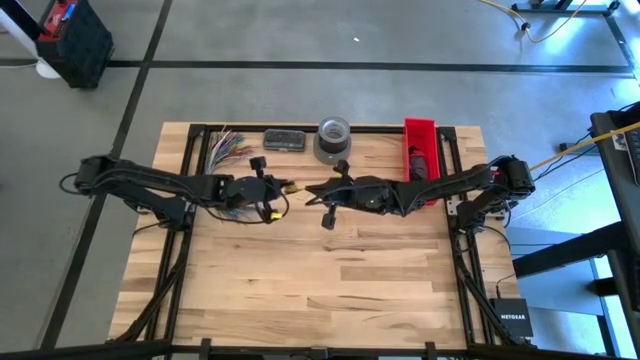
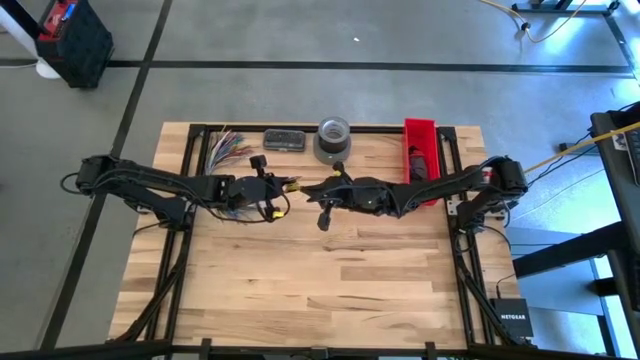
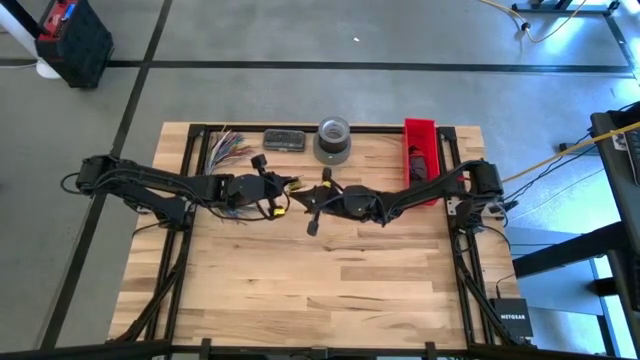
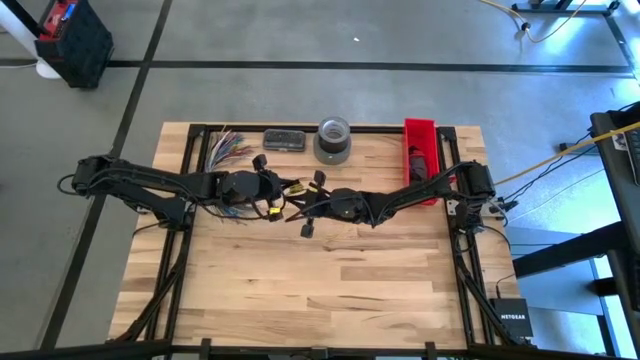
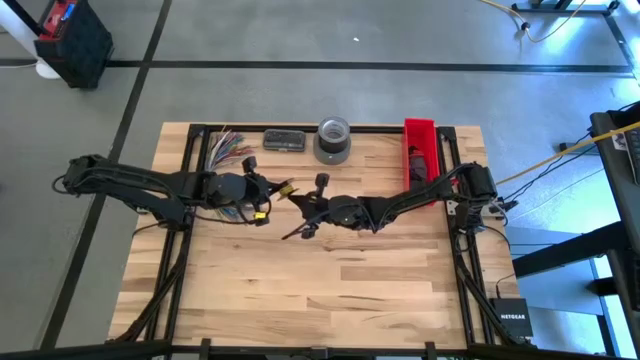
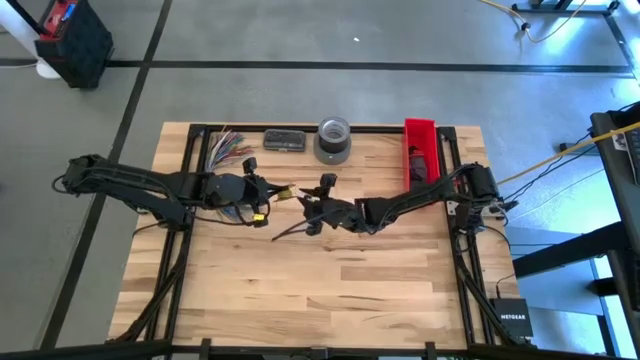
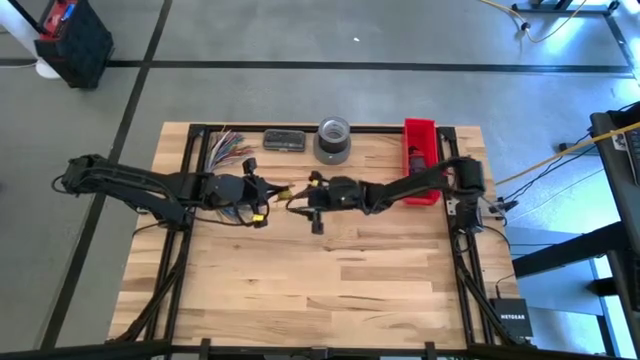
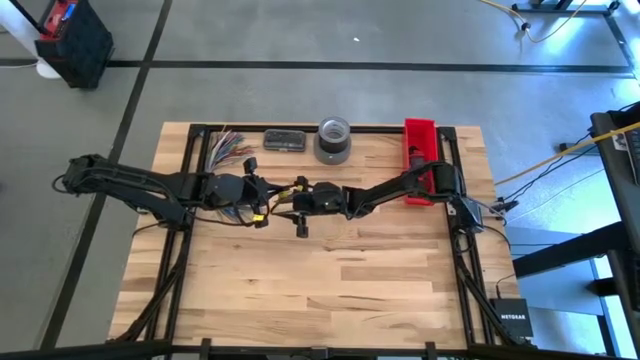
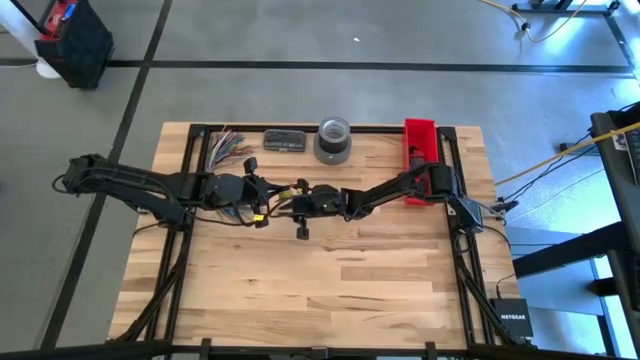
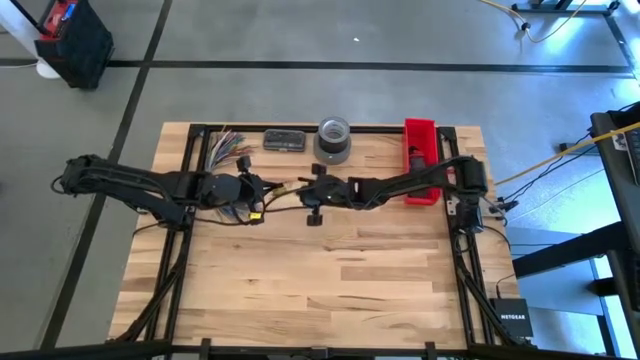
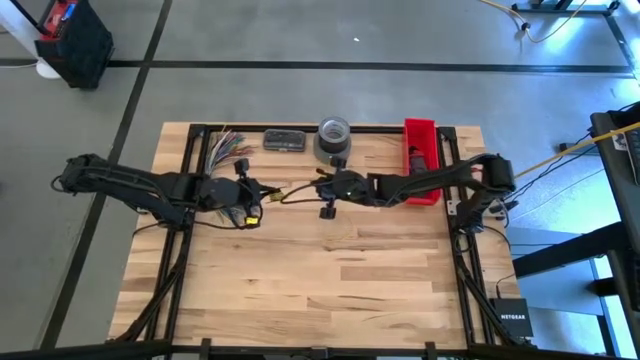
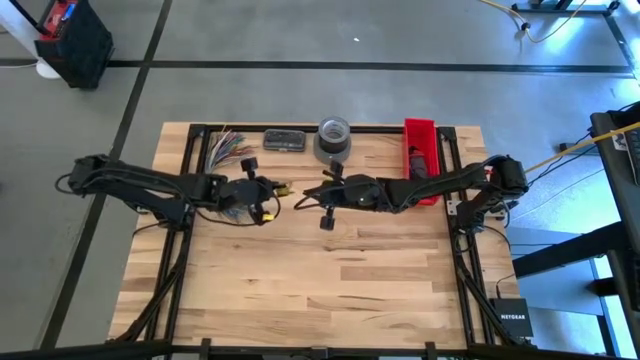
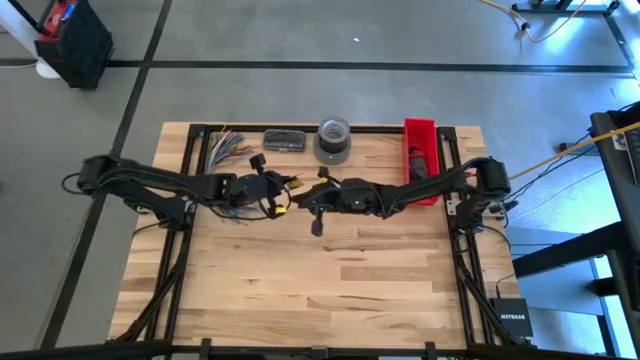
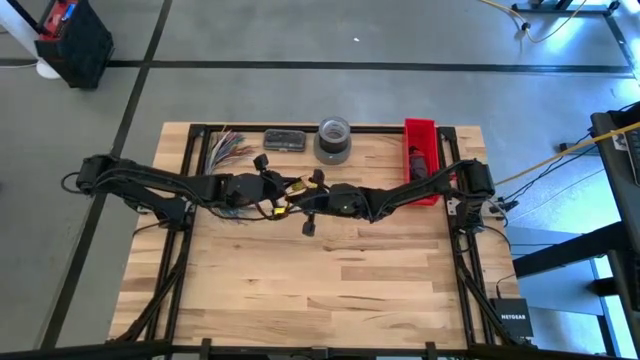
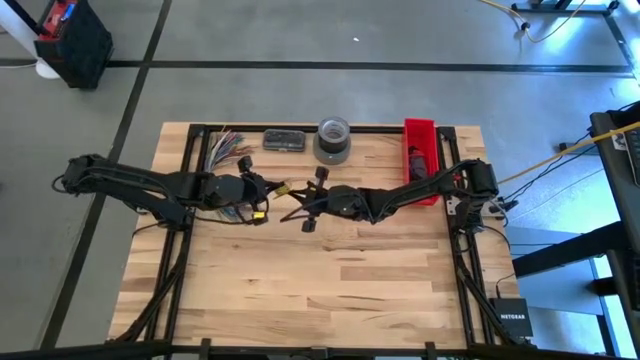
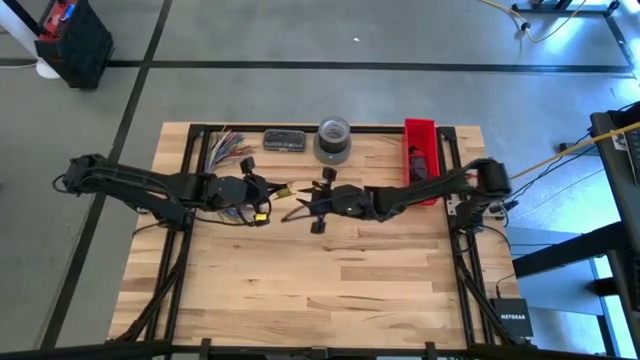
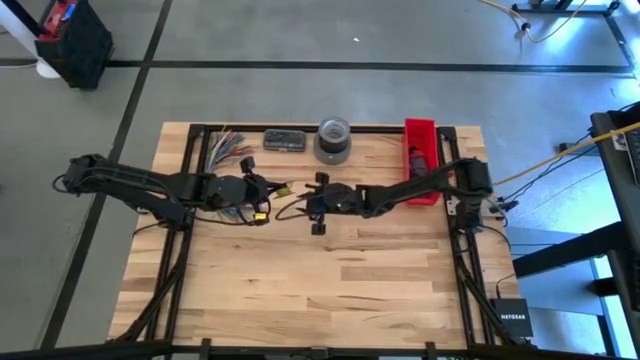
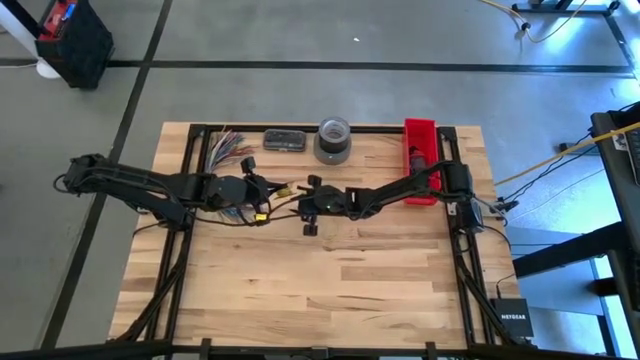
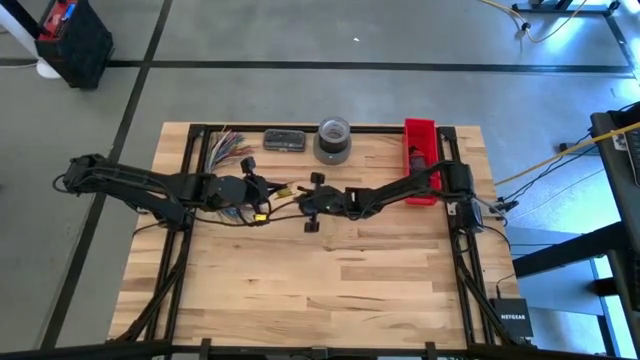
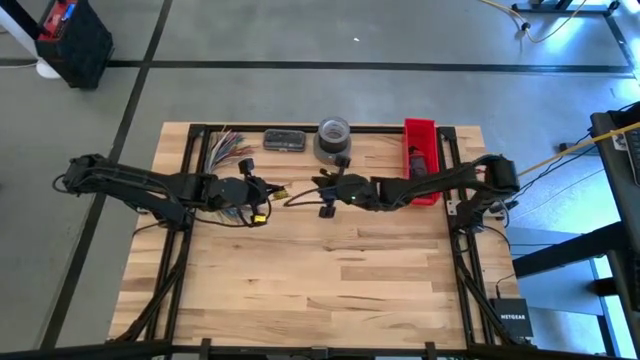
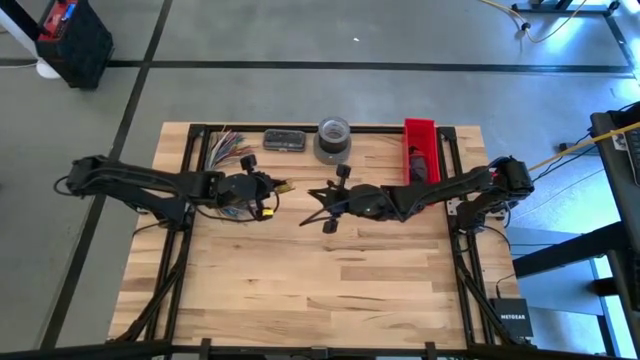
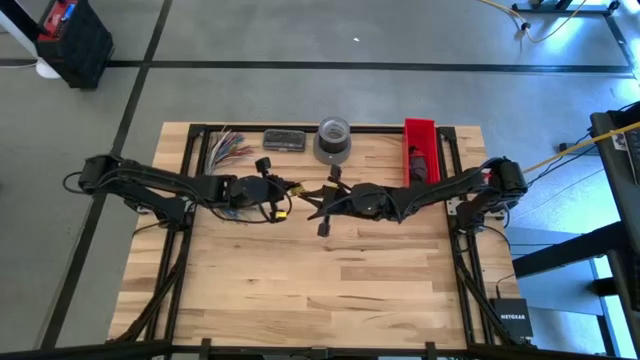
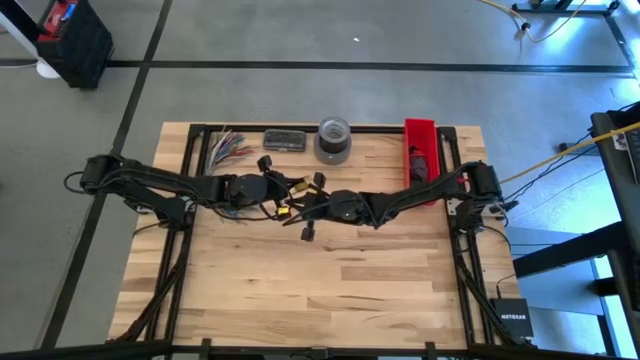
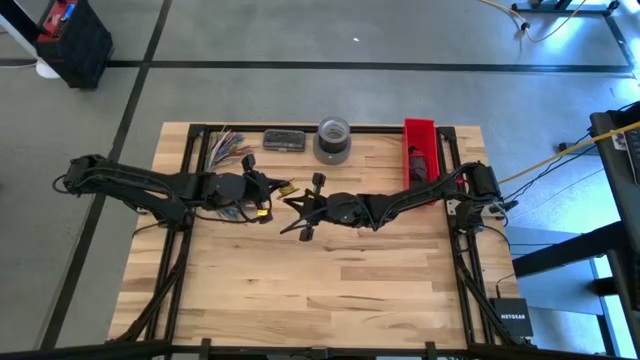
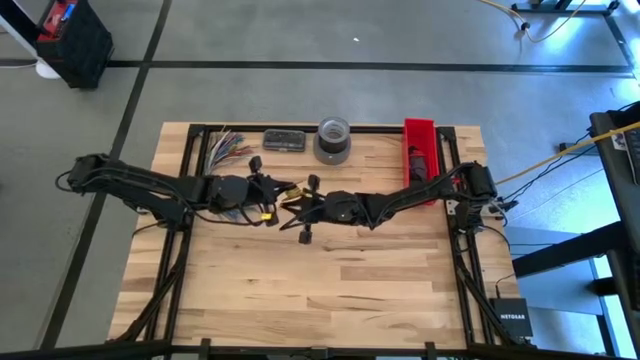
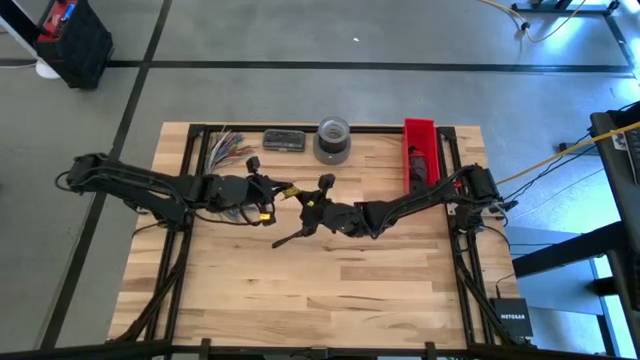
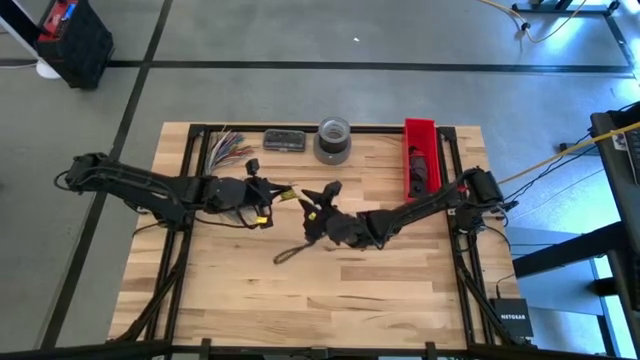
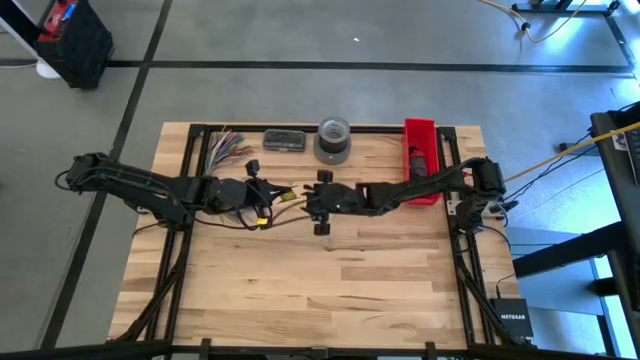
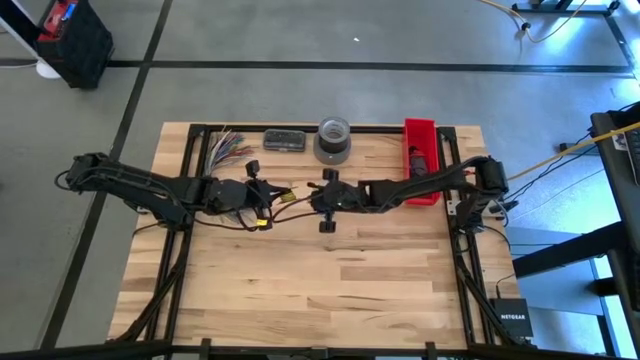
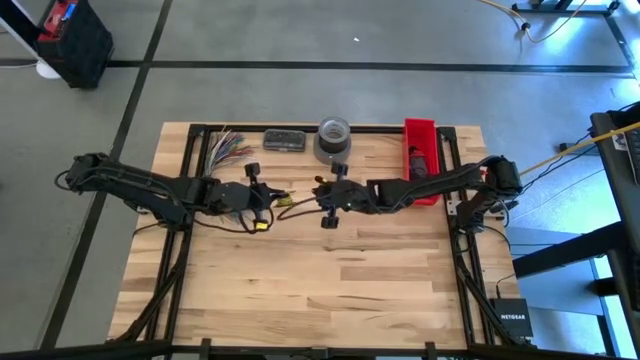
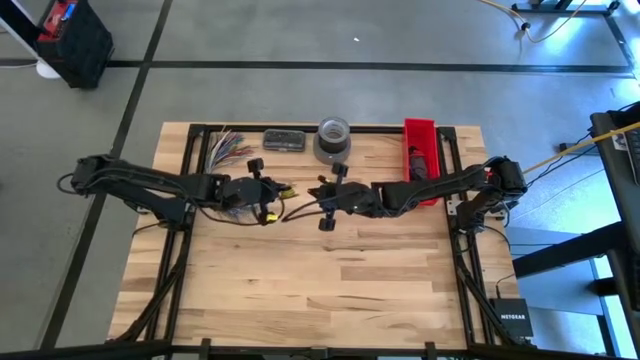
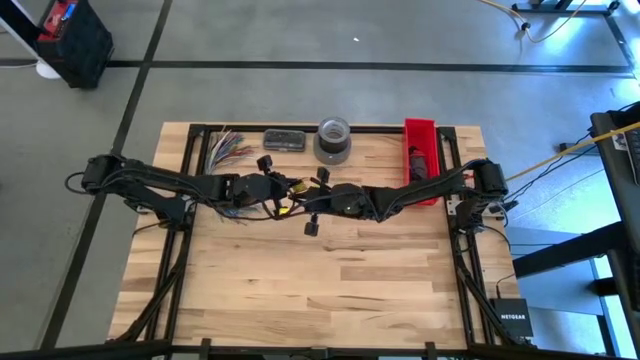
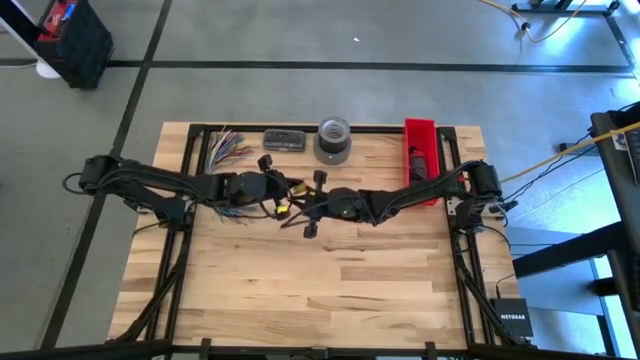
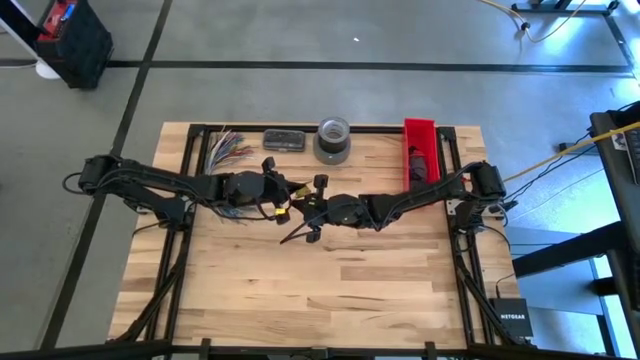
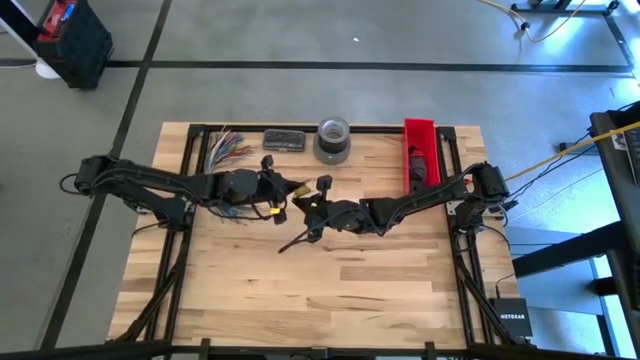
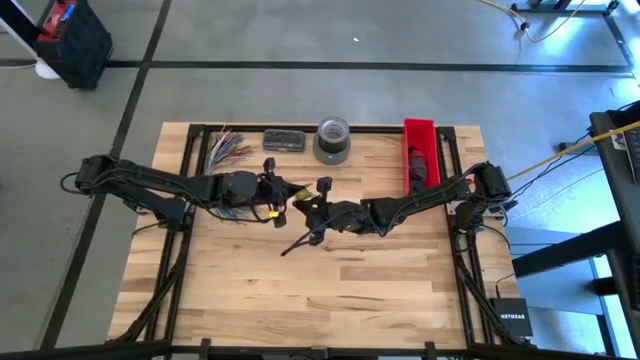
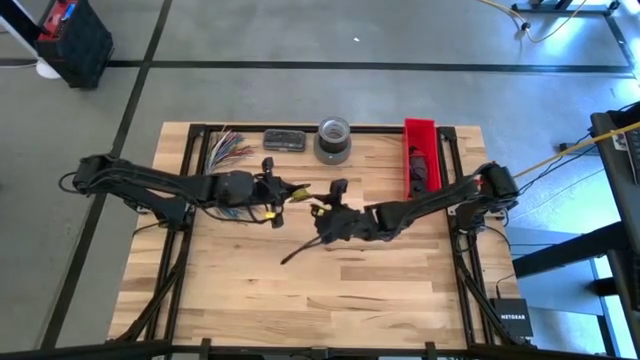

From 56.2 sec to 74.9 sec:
Task: Coil cords
Coil the yellow wire onto the spool

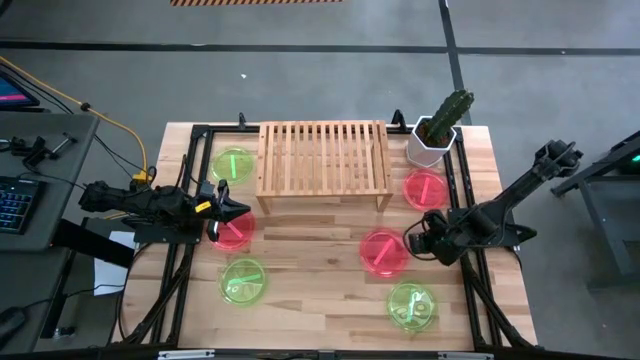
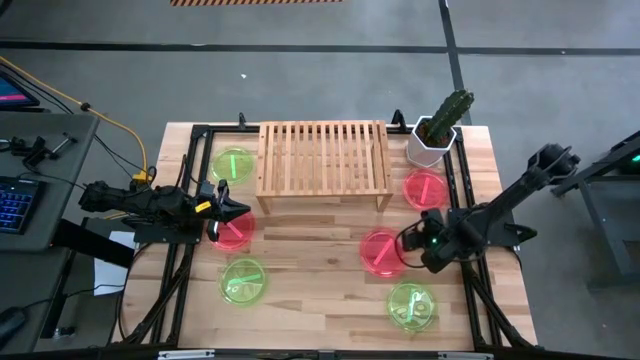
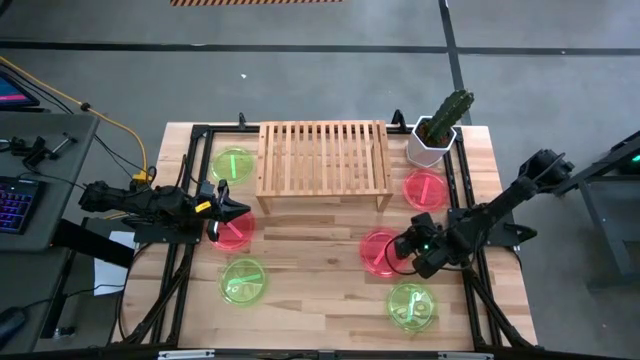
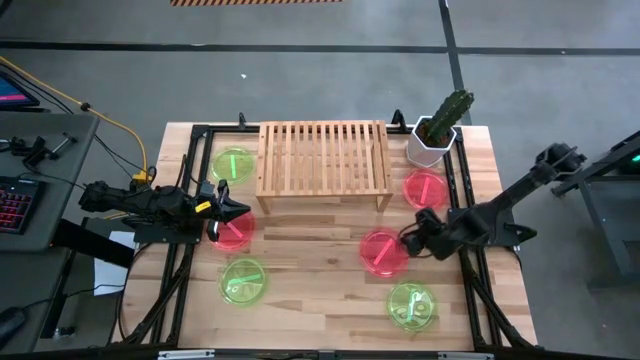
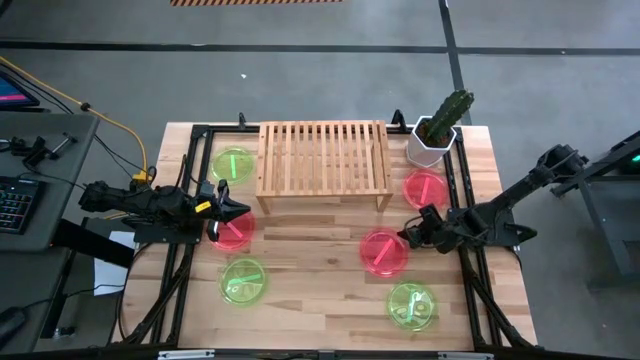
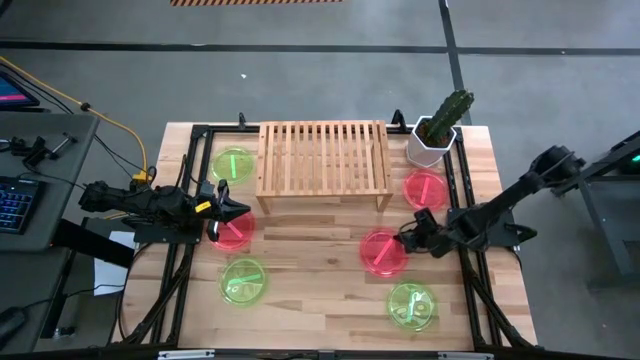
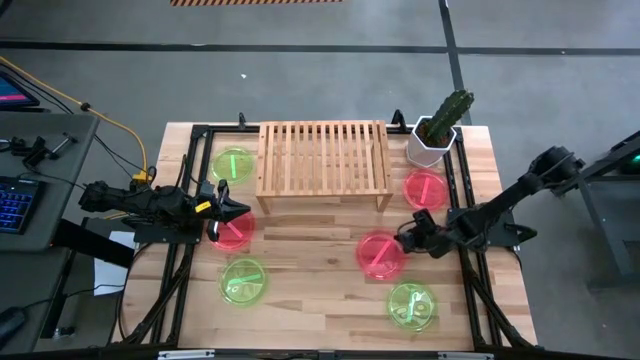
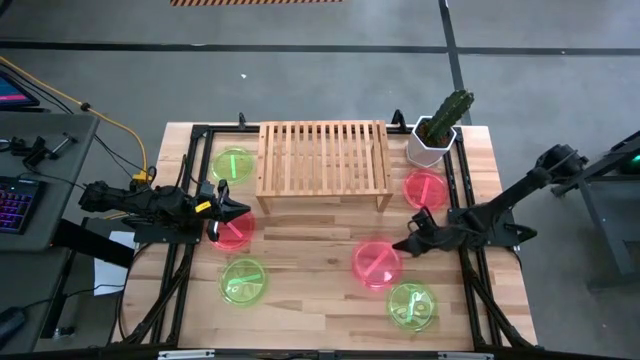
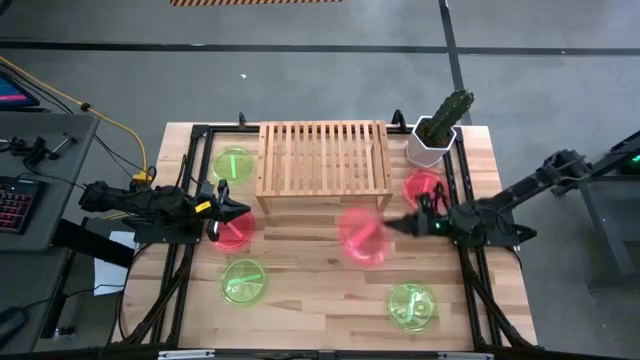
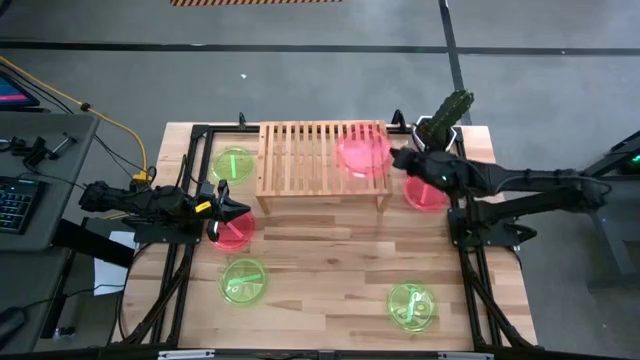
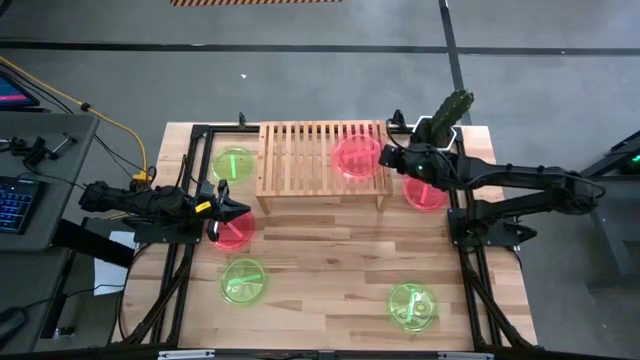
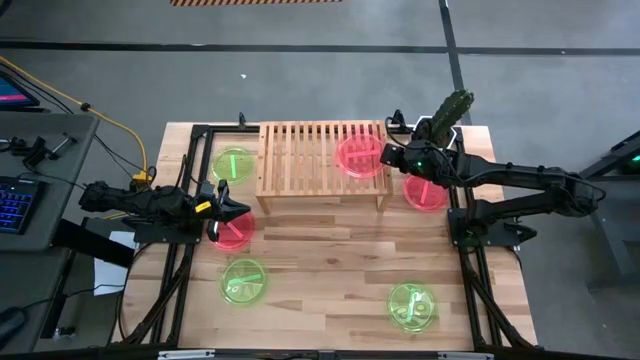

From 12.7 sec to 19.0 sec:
Task: Place and stack plates onto a shelf
Put the bottom right pink transparent plate on the shelf
